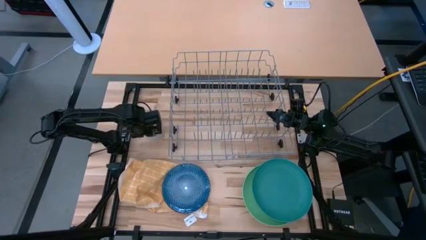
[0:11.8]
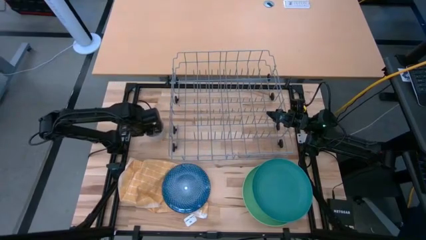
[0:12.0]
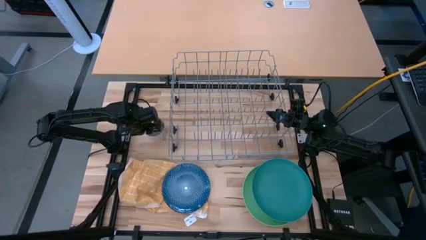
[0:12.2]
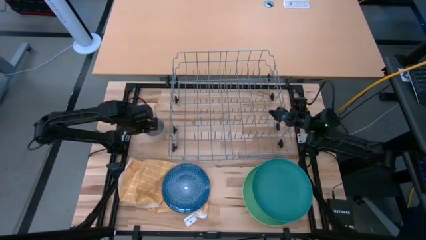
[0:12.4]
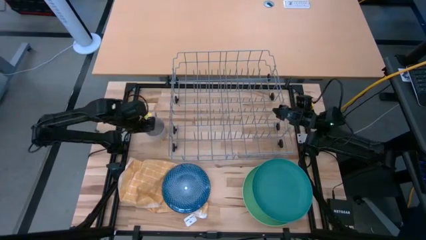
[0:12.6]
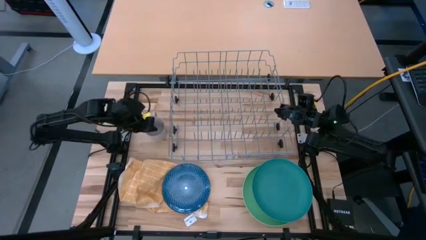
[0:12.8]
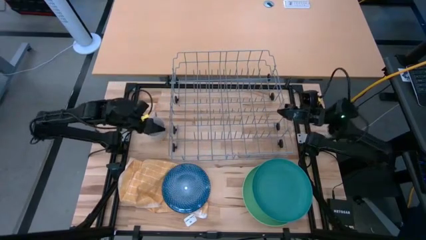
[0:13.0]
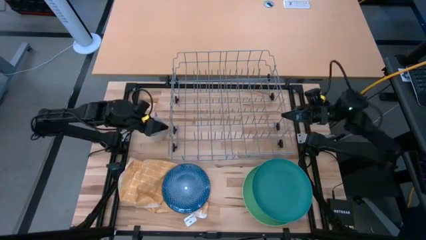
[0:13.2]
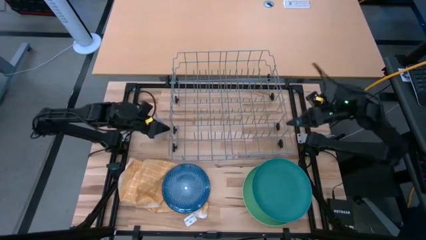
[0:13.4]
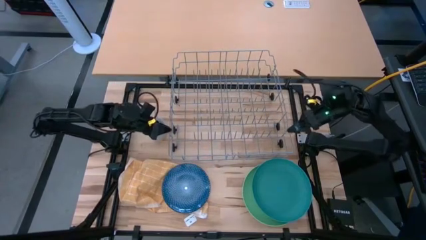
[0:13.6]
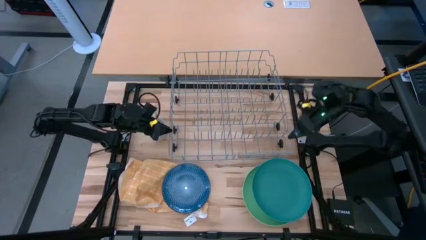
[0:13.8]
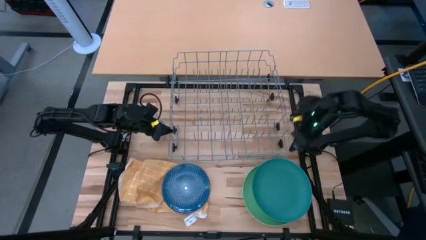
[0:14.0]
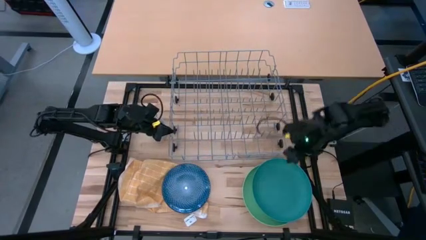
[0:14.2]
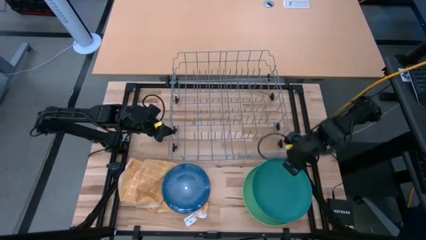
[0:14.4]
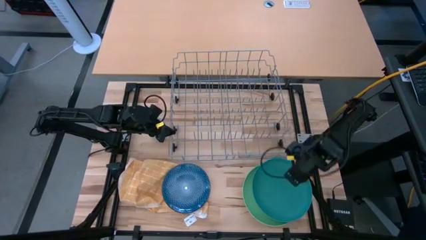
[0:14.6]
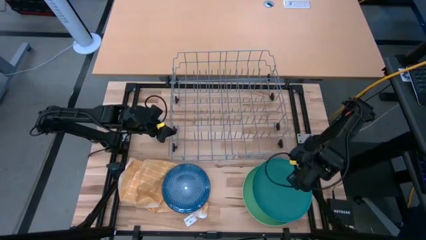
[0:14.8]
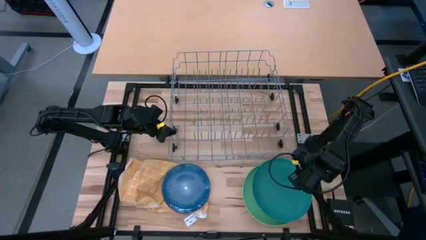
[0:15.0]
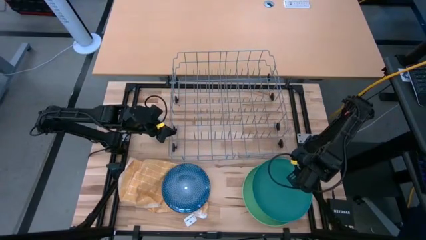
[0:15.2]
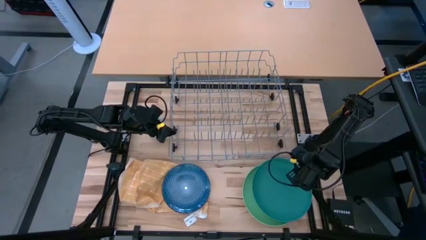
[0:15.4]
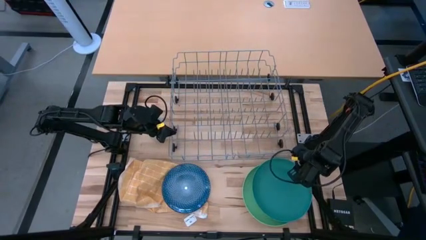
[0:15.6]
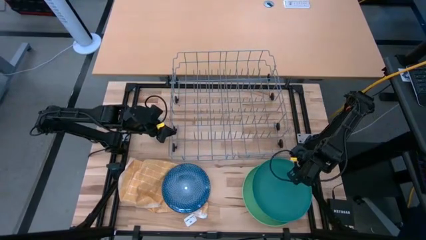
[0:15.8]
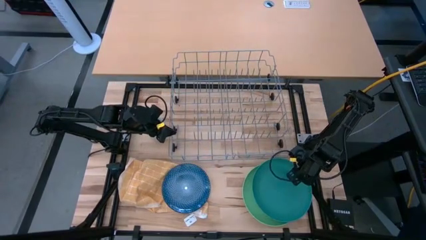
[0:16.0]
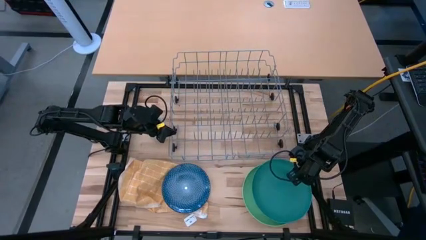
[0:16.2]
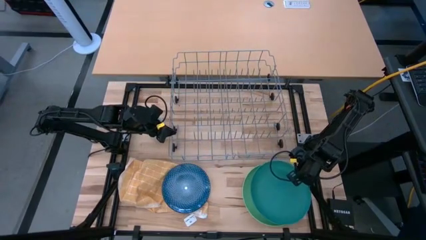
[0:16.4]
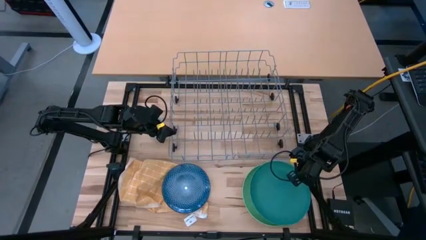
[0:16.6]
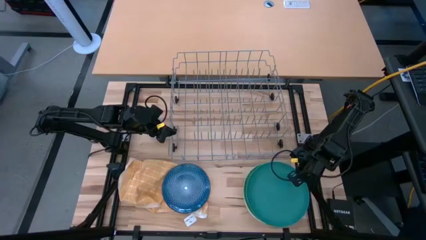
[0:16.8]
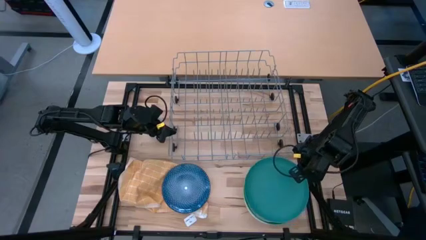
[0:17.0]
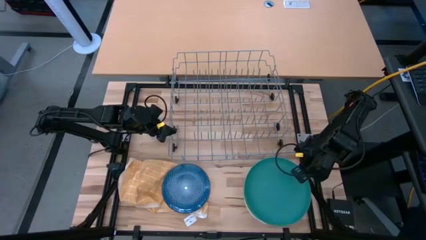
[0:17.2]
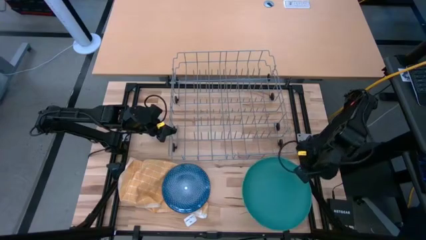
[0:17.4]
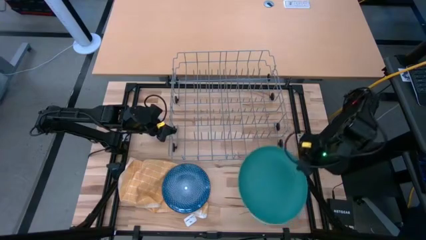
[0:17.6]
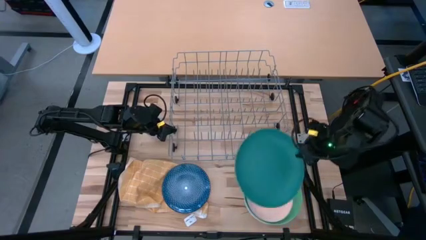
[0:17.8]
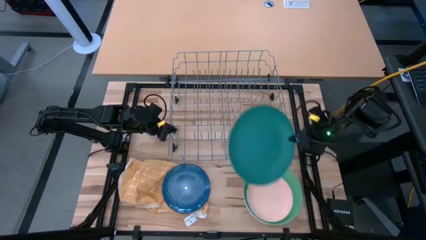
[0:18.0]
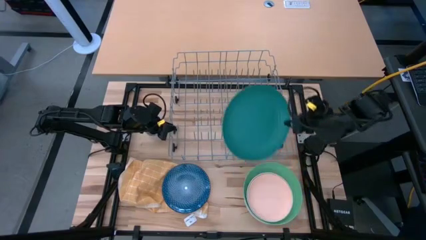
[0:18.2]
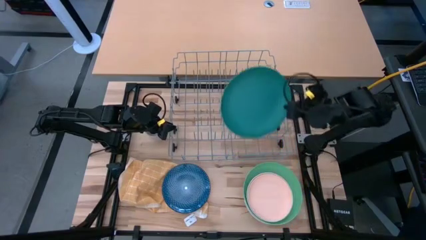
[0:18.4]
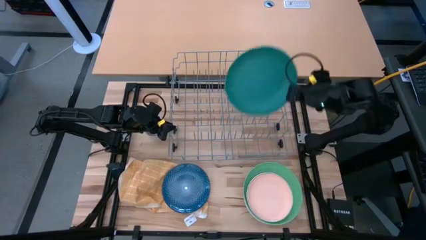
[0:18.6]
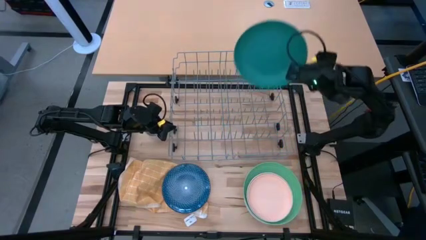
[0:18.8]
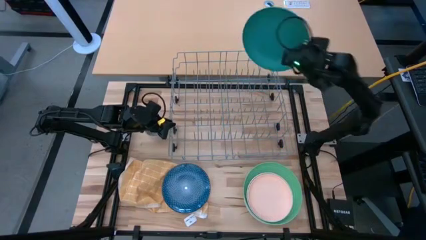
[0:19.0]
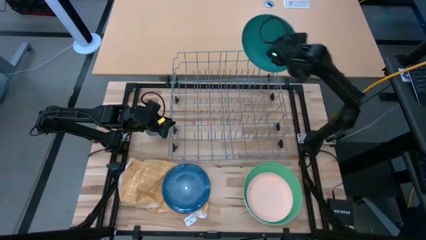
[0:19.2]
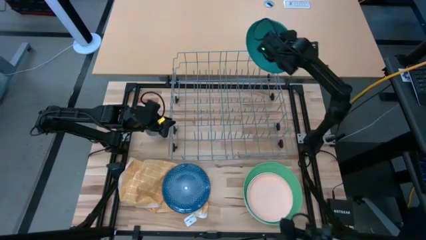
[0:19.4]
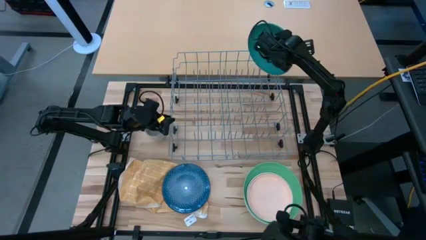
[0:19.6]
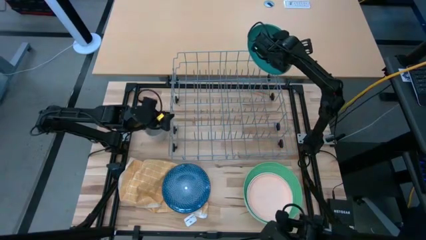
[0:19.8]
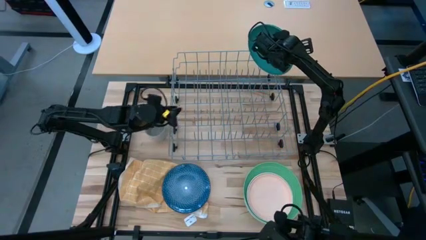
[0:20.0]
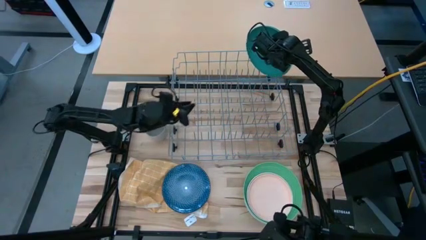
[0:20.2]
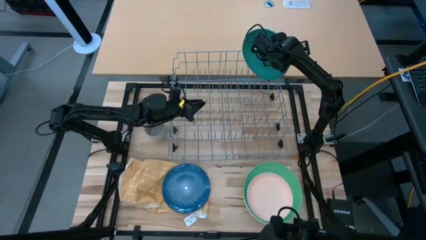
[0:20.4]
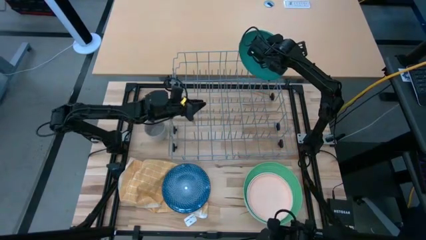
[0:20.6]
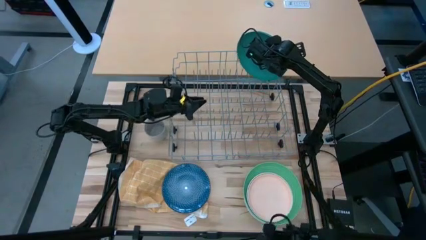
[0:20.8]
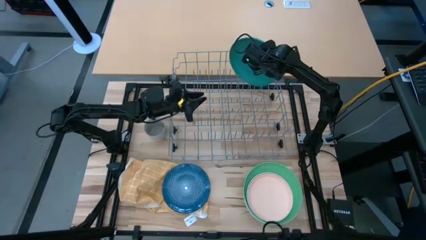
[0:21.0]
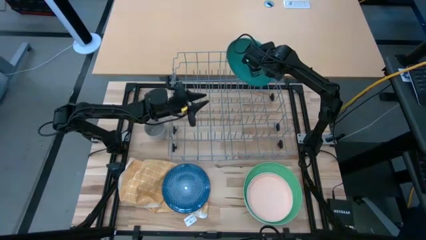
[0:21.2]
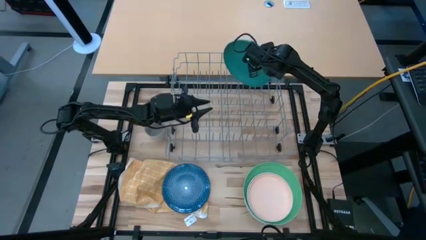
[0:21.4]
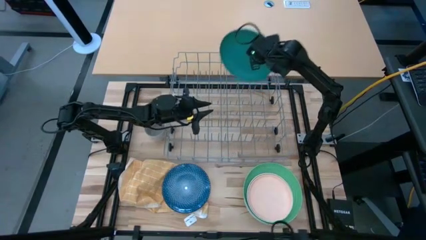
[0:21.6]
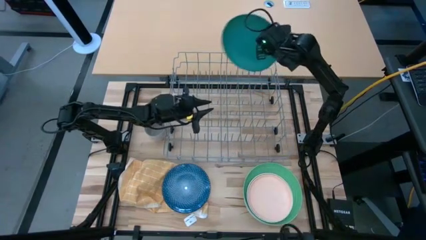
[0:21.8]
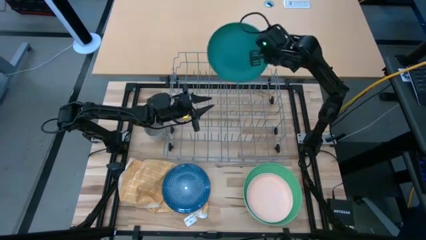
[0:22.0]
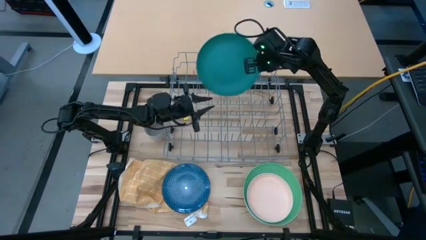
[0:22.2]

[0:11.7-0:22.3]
Task: Sort dishes
Put the green plate in the dish rack
